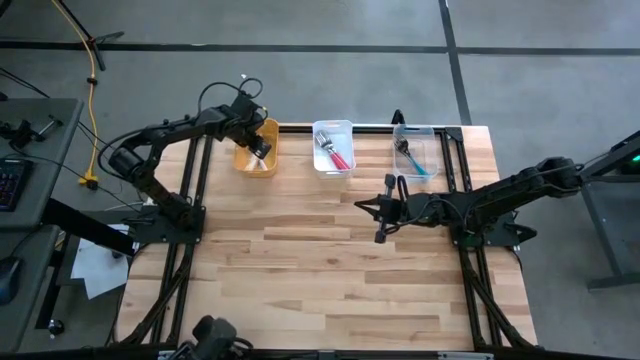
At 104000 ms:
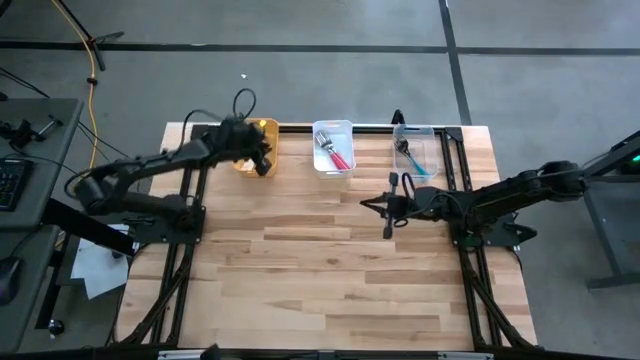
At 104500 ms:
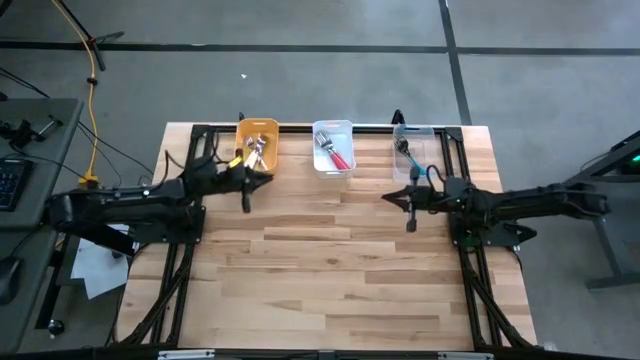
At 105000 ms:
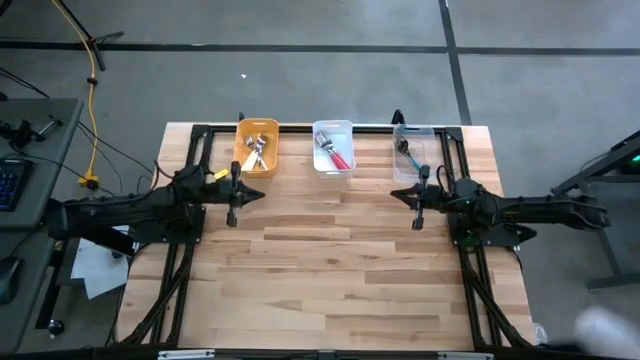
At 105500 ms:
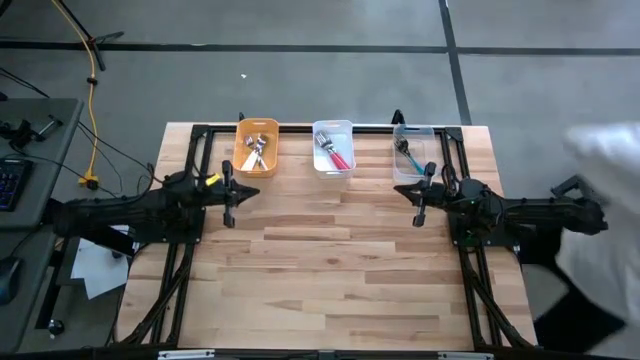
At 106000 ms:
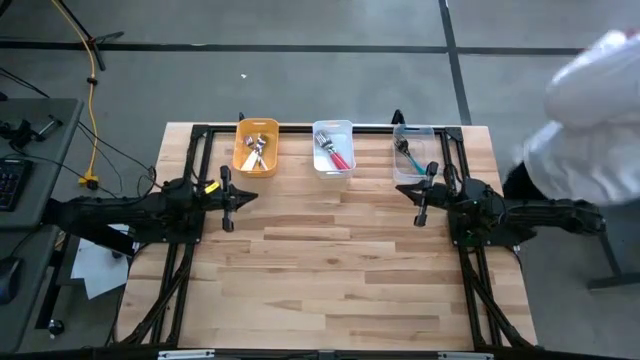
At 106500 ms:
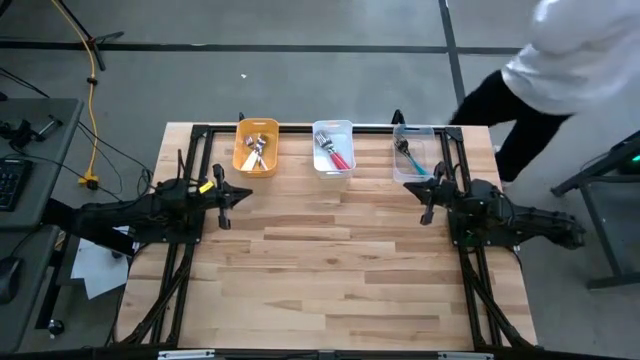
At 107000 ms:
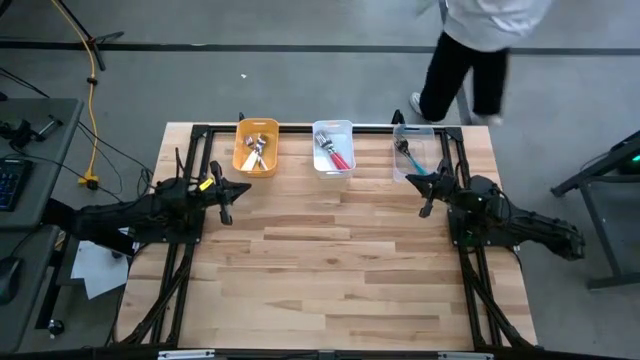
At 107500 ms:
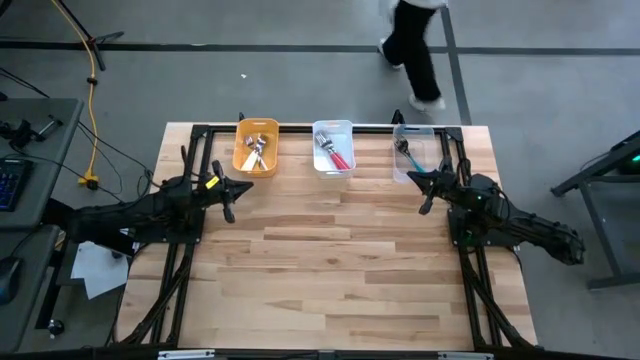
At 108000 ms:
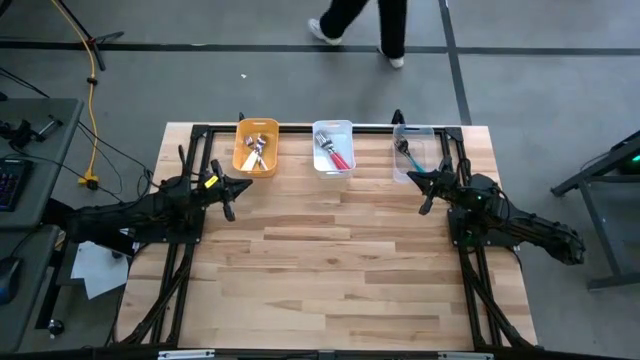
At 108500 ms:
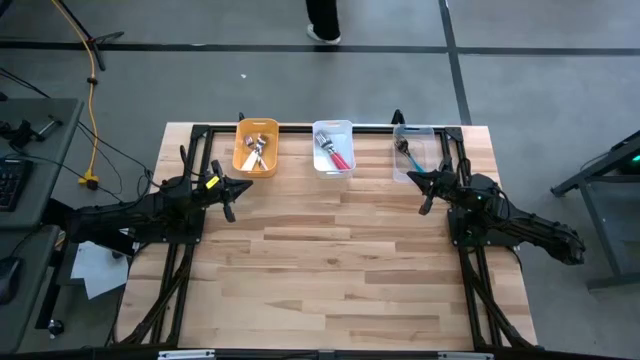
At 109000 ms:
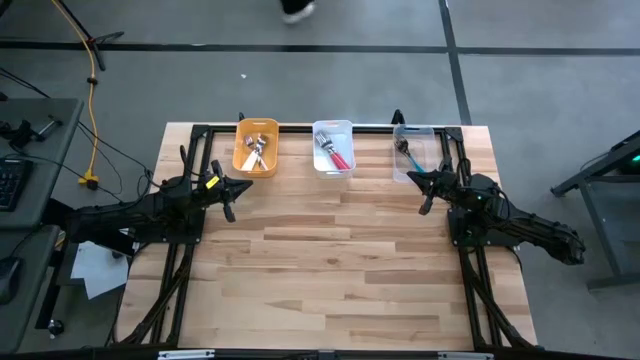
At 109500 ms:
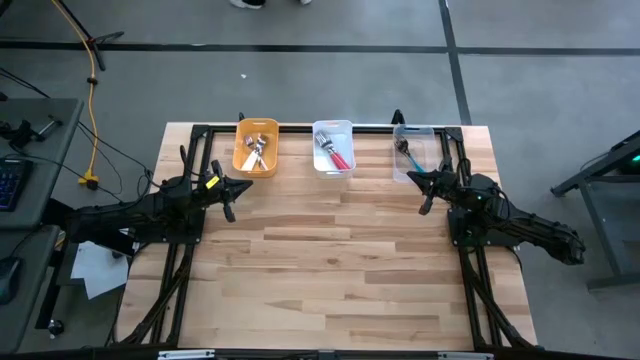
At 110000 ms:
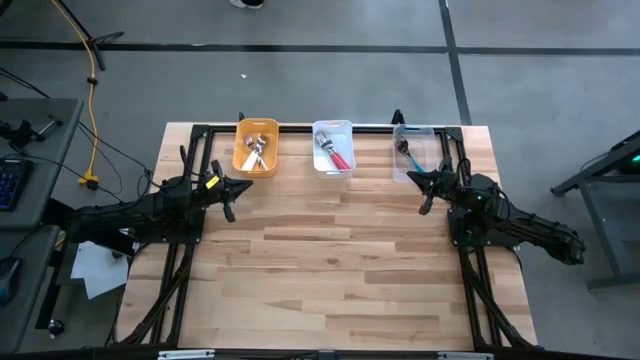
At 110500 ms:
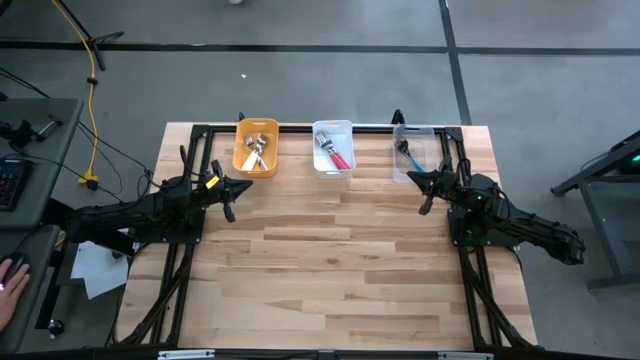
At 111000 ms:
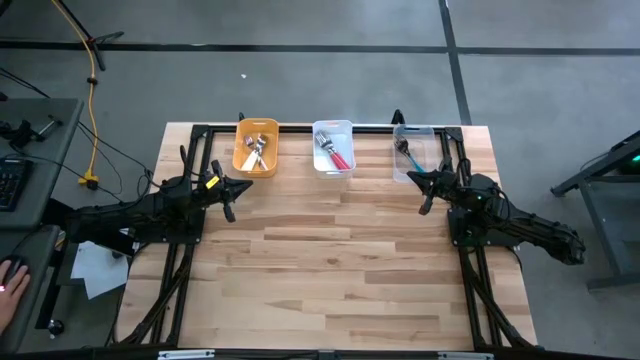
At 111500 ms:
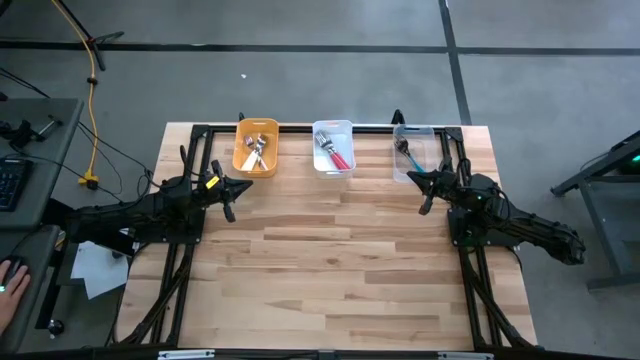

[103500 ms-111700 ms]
Task: Sort silverware by color (type)
Return to Home Position

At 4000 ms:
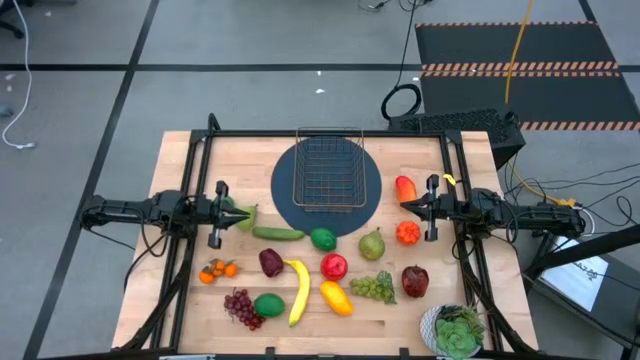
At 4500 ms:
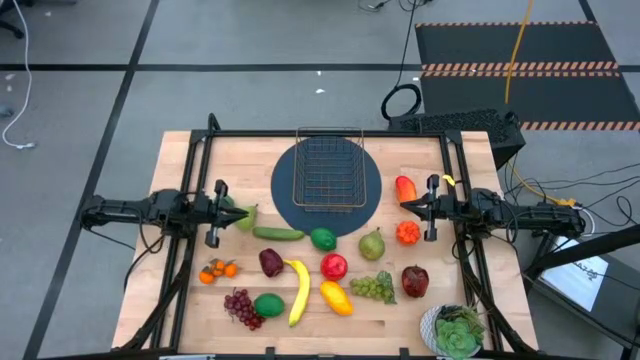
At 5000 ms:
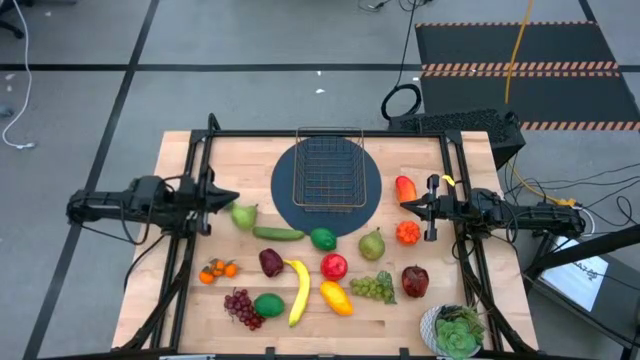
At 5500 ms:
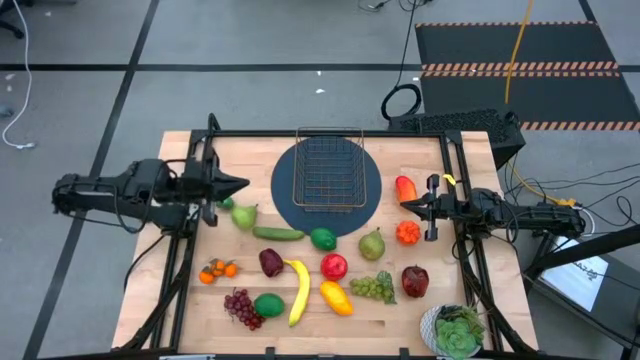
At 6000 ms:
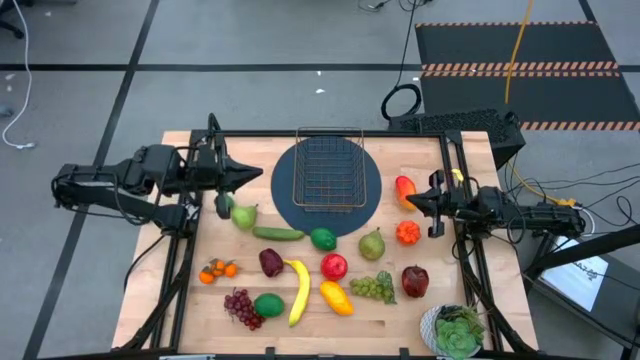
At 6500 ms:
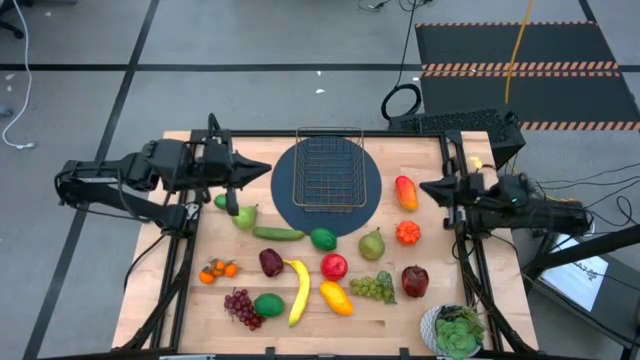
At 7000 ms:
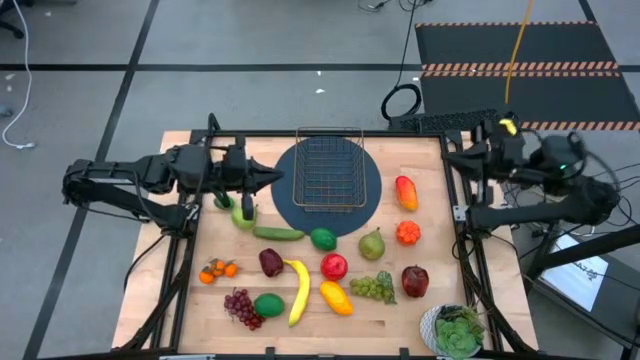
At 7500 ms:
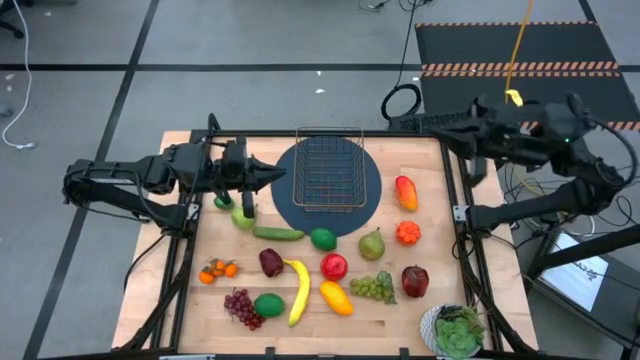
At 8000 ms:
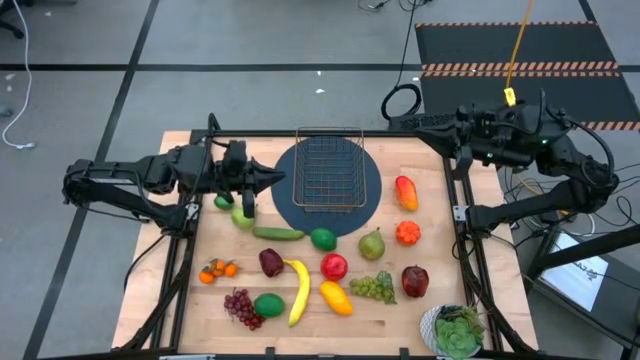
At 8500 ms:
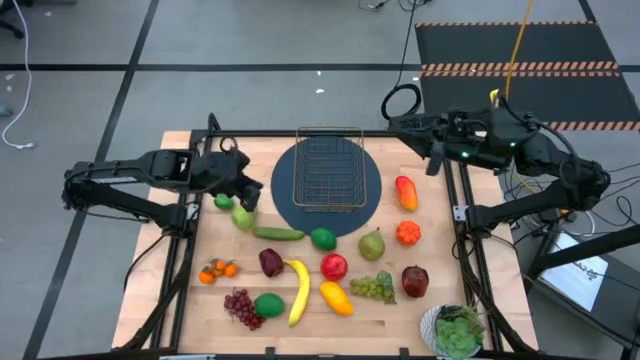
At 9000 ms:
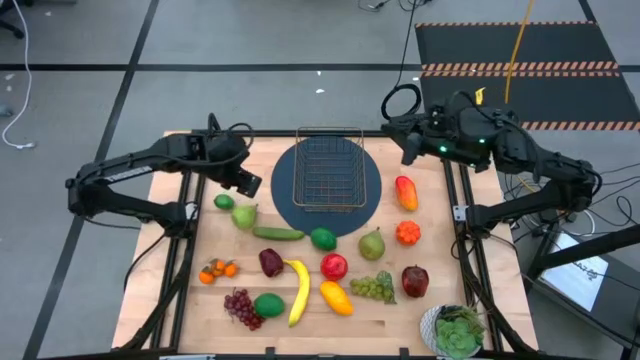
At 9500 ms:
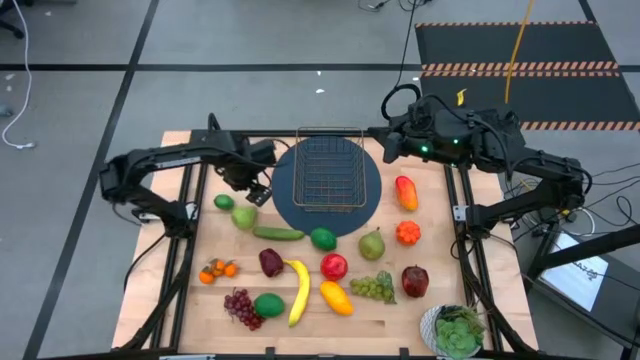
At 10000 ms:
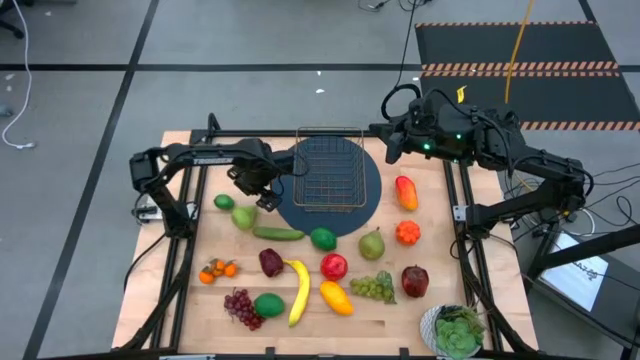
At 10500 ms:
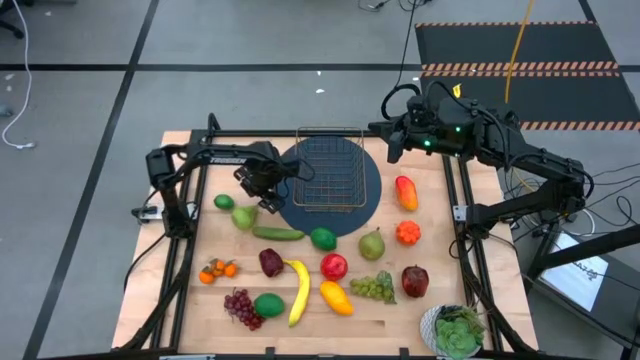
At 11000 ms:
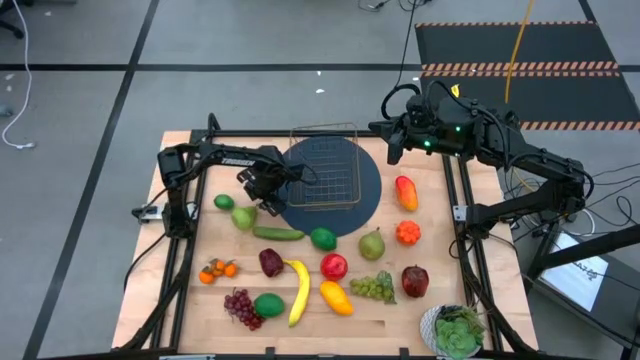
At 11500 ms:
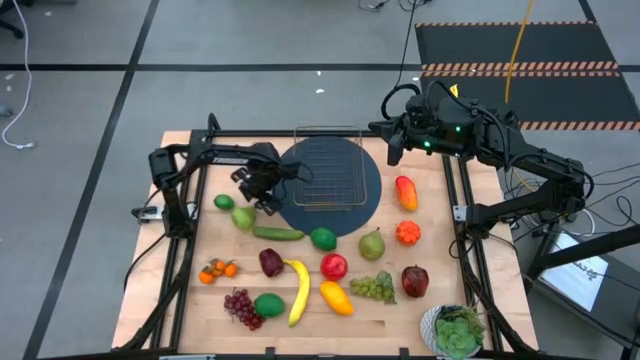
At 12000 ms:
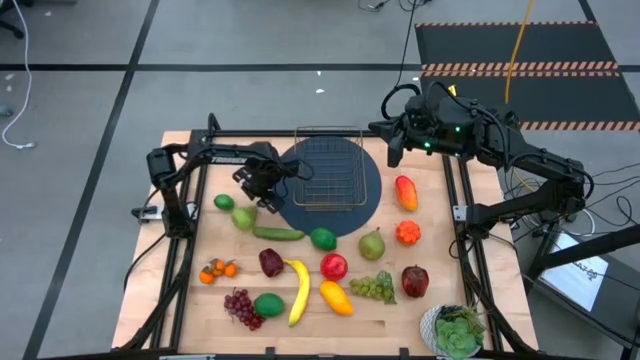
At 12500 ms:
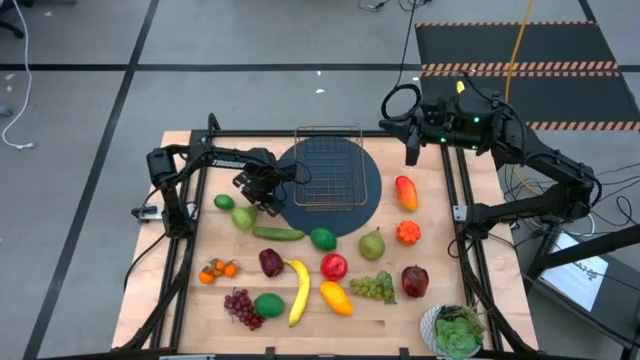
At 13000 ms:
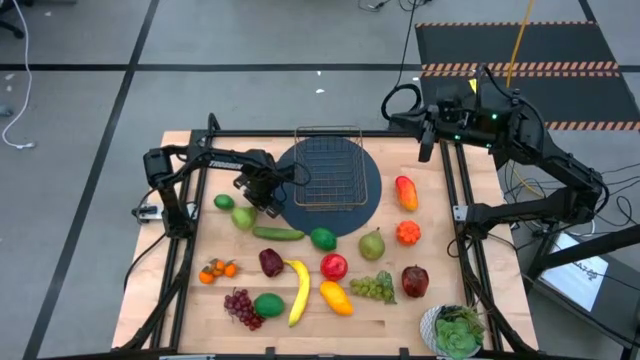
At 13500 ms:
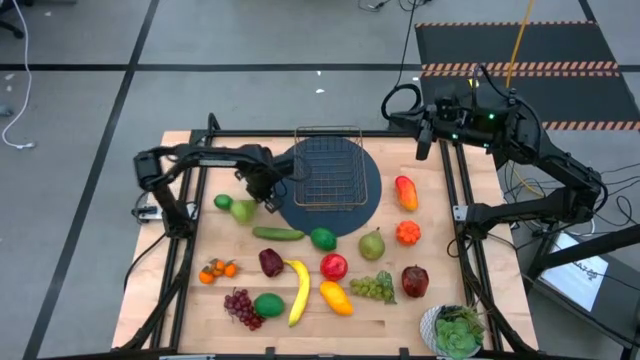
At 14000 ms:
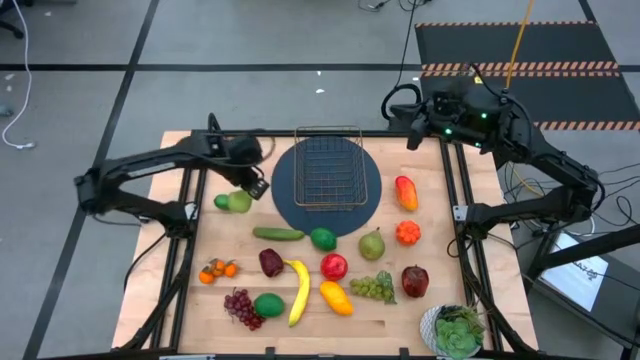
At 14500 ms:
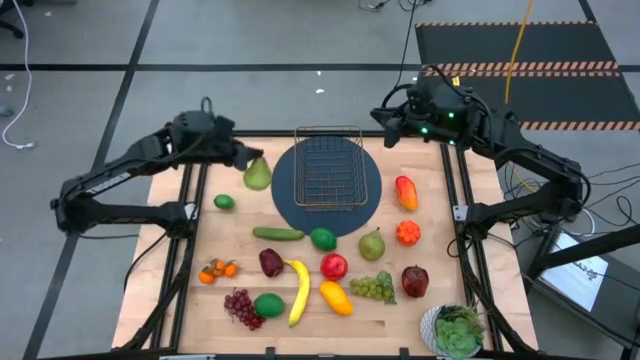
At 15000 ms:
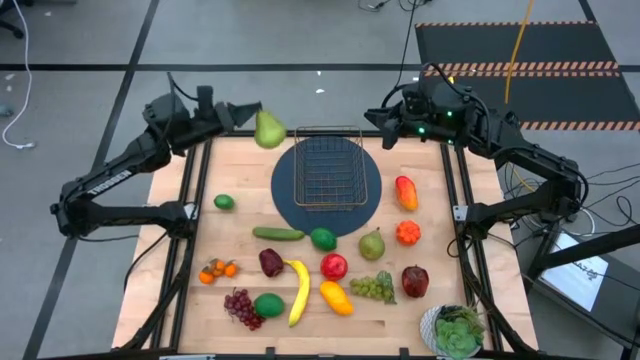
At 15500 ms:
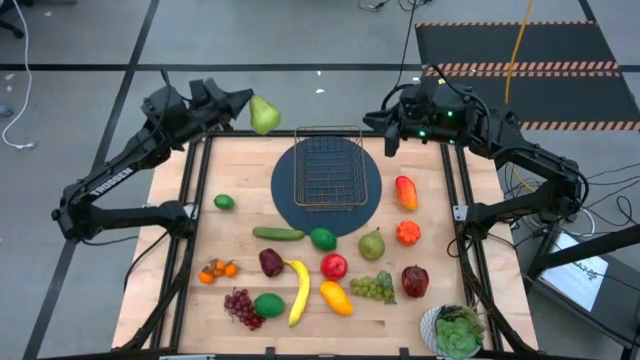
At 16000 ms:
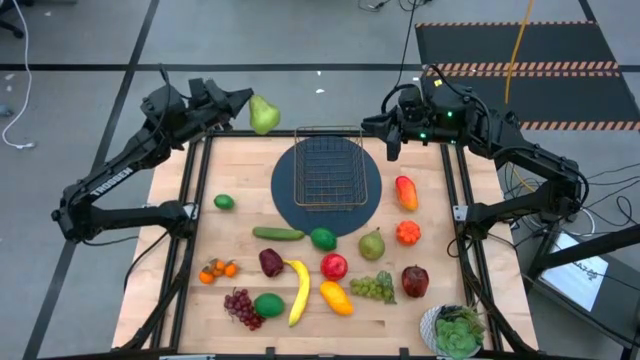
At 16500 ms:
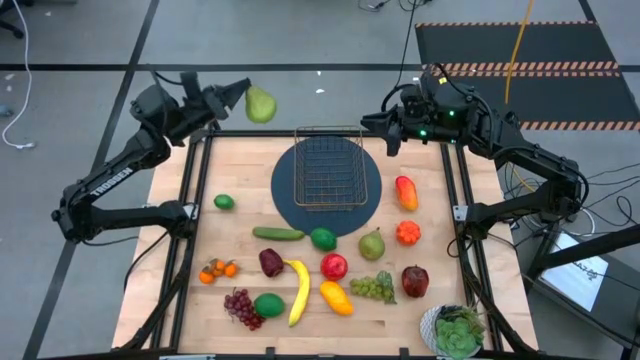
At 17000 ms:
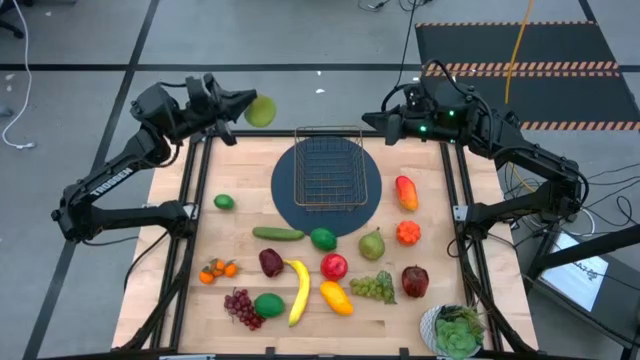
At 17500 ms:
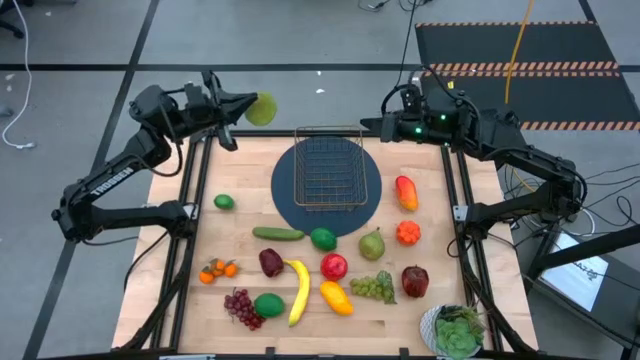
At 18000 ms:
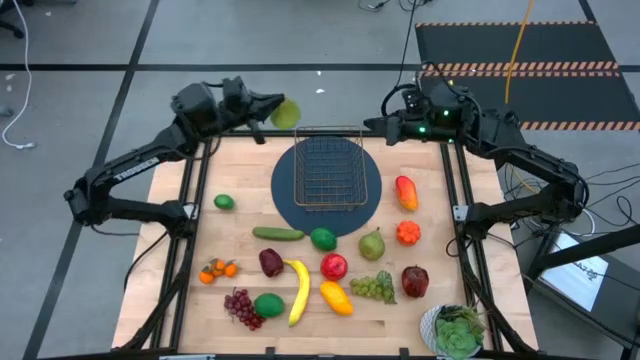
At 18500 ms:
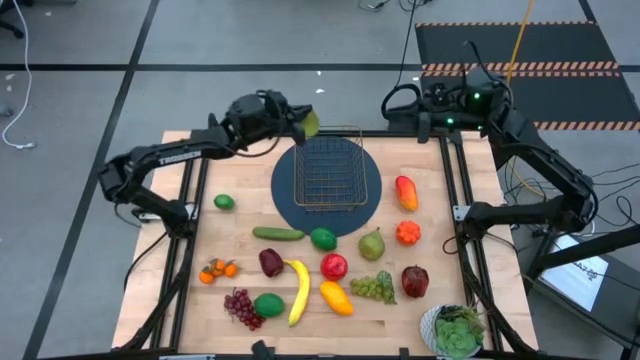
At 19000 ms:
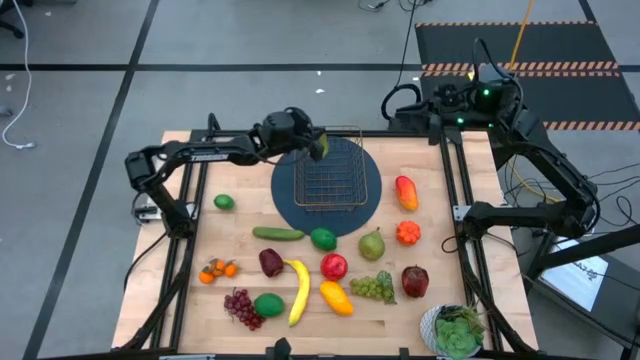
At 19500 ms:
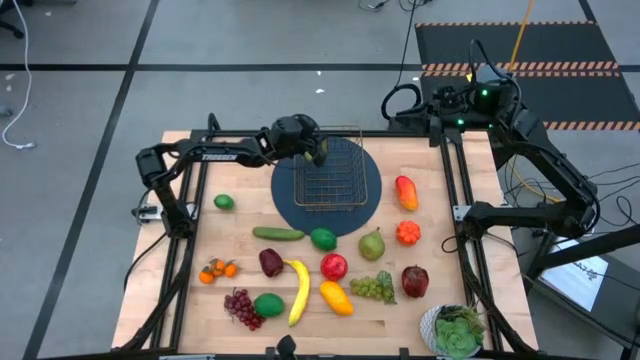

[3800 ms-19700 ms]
Task: Build produce basket
Put the top green pear into the gold wire basket
